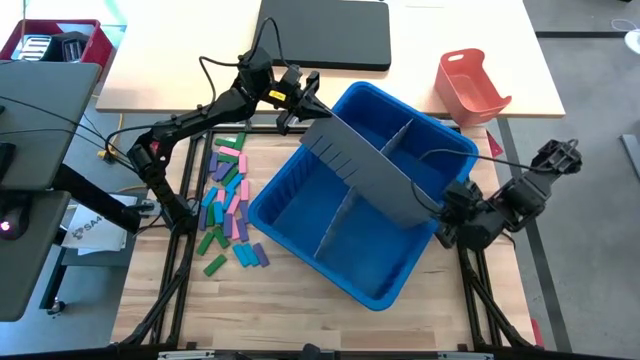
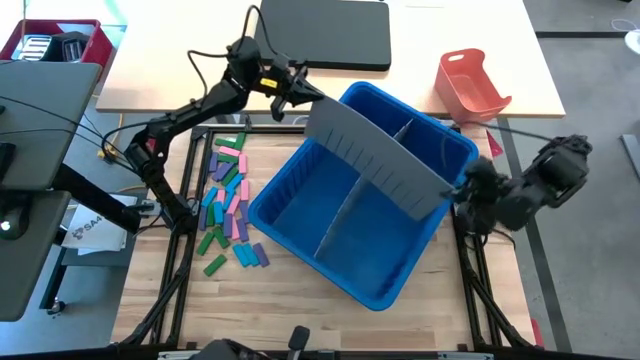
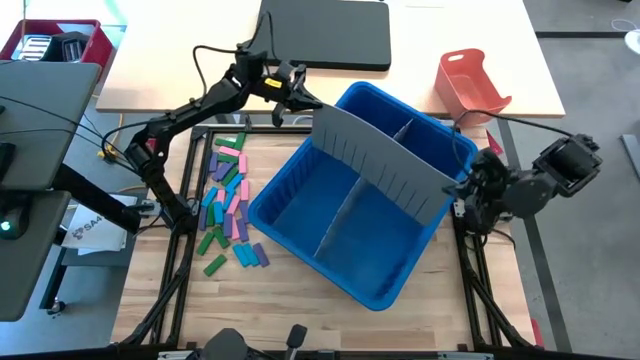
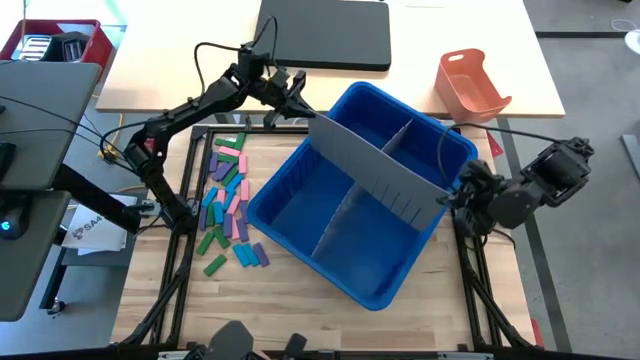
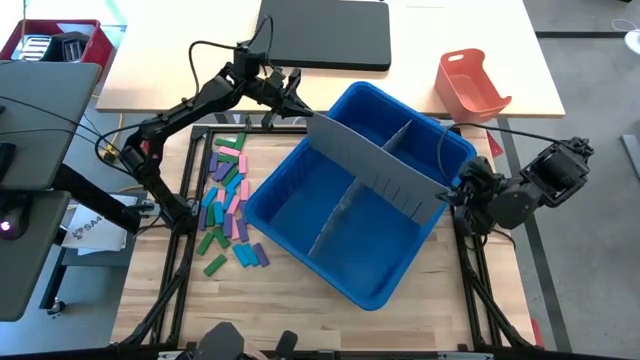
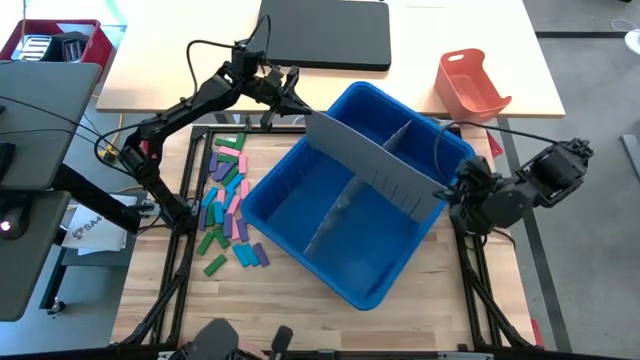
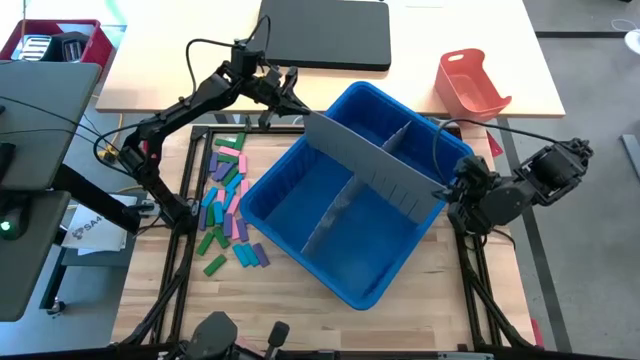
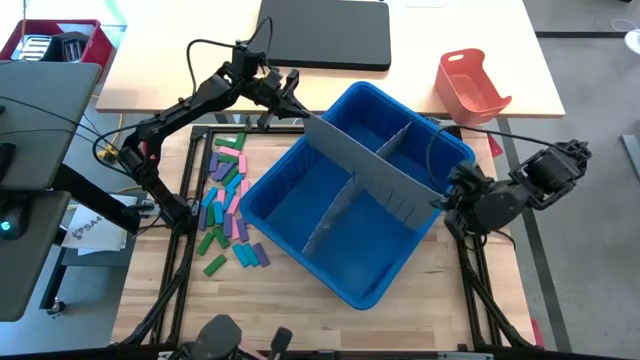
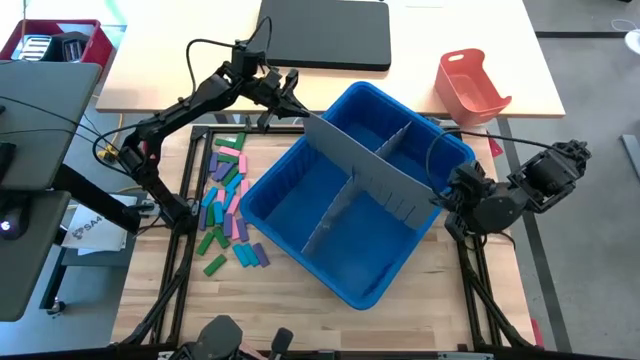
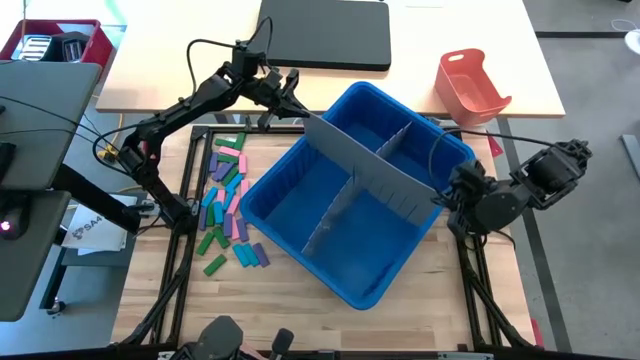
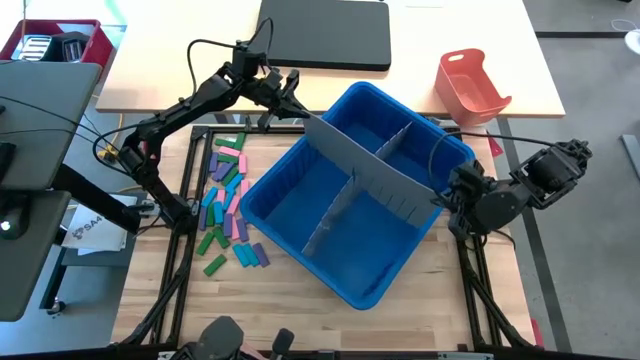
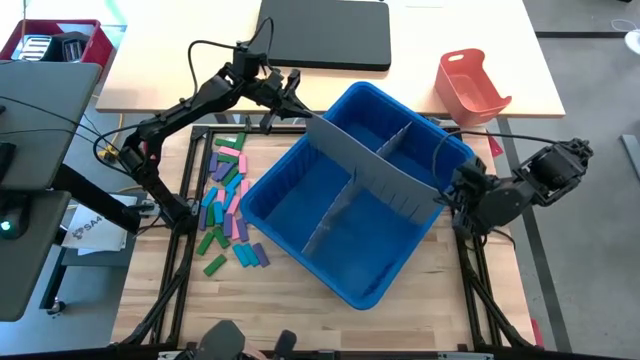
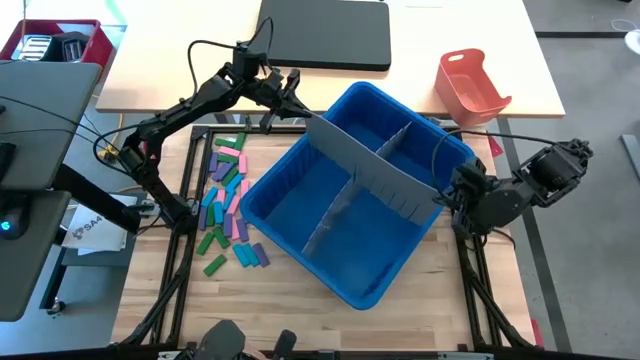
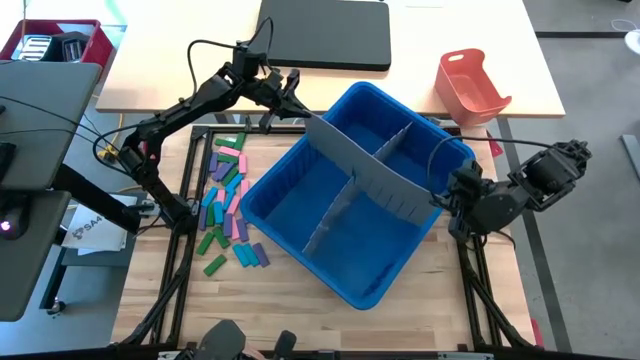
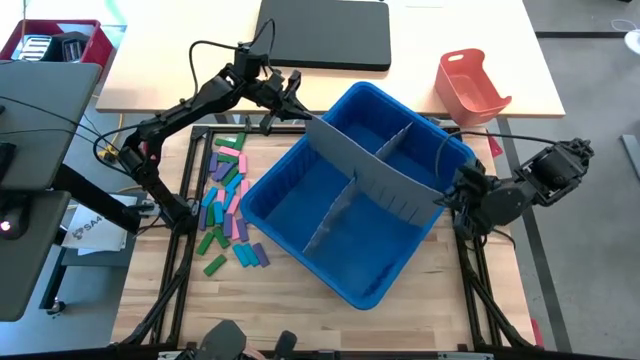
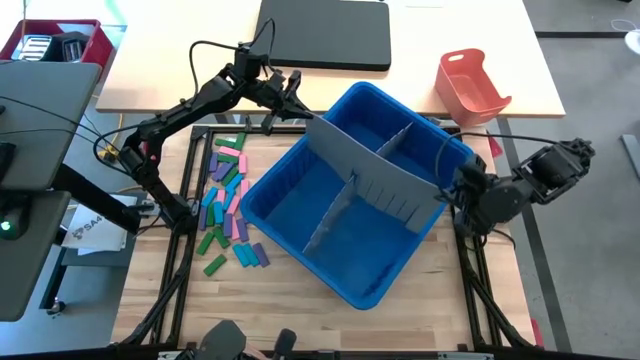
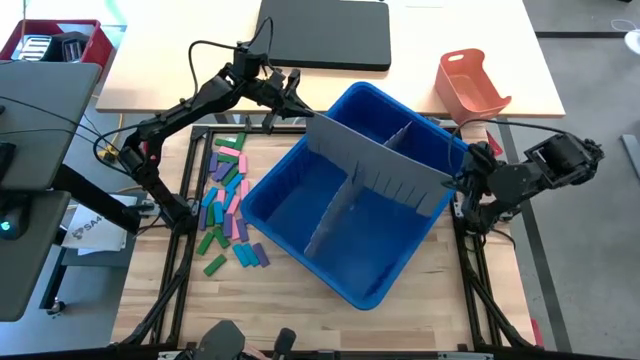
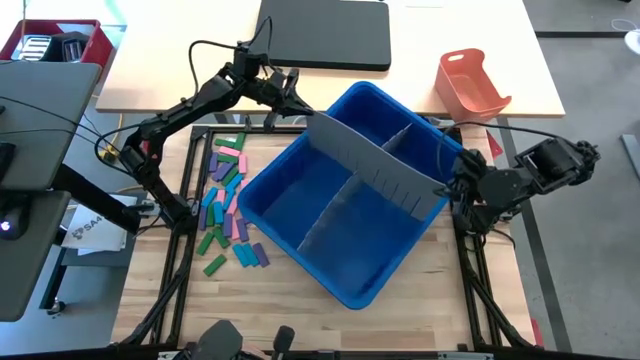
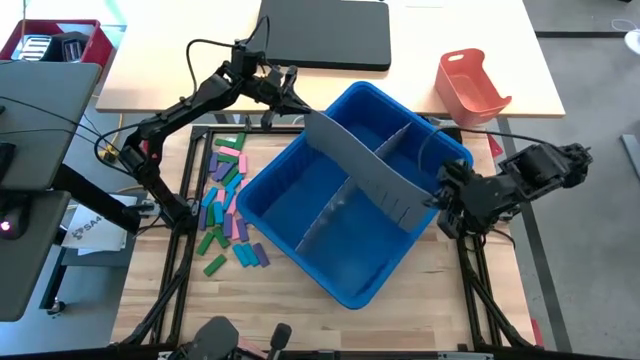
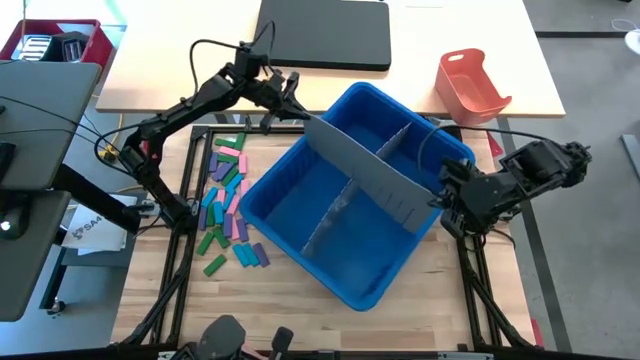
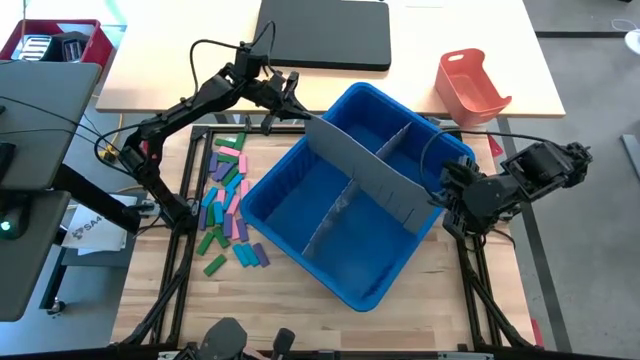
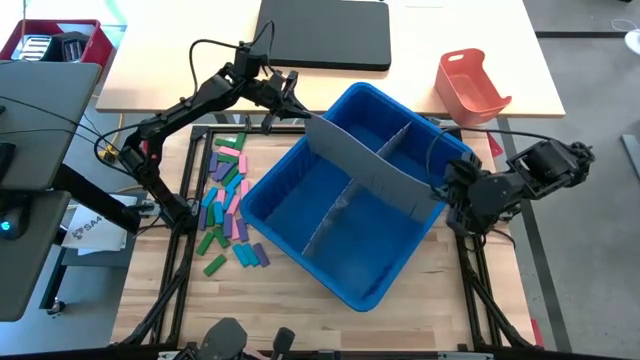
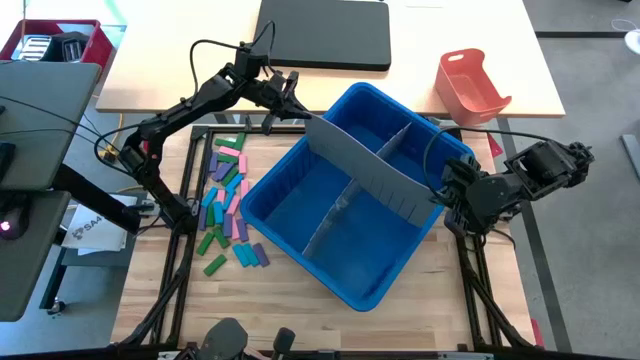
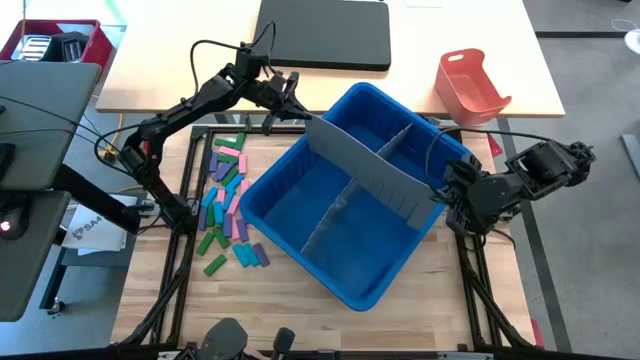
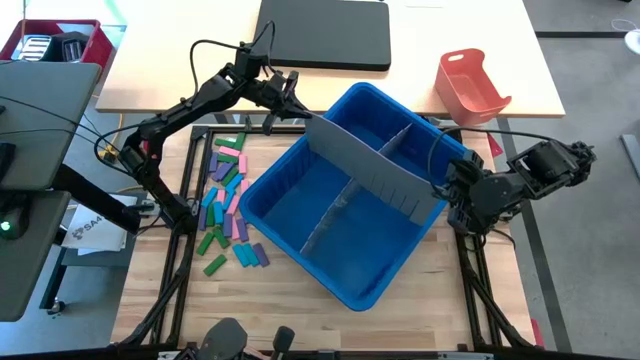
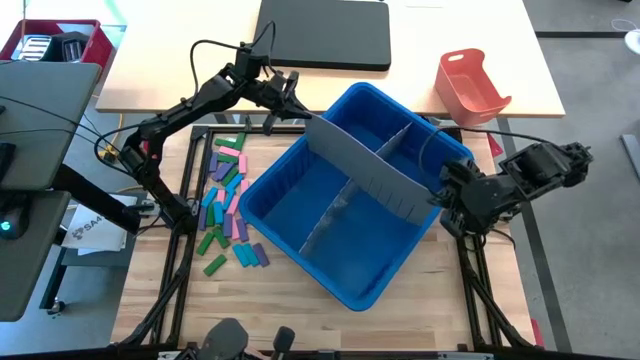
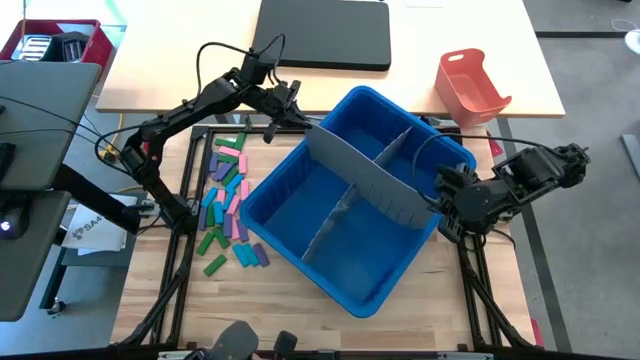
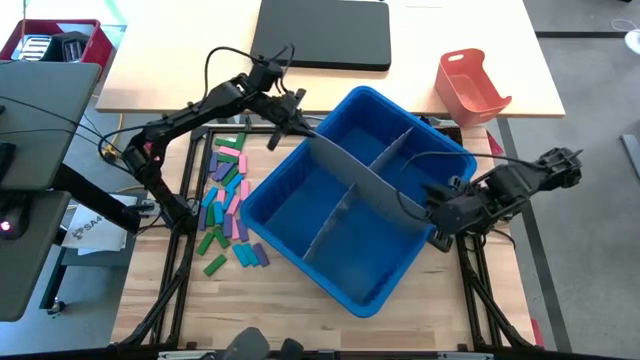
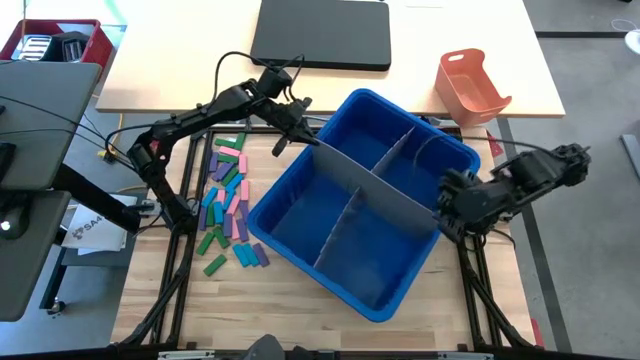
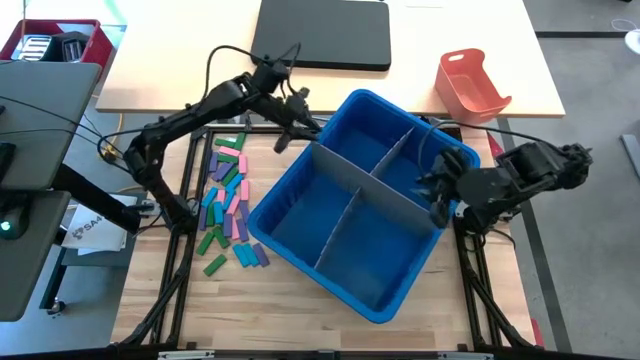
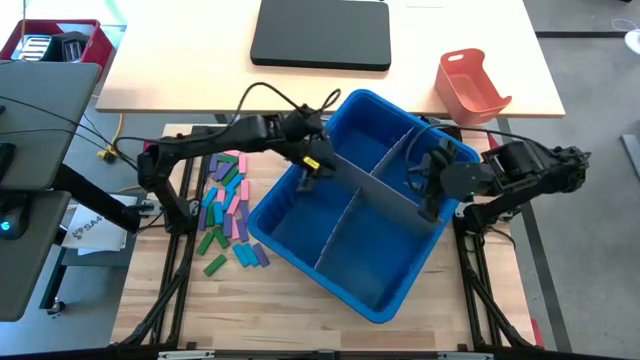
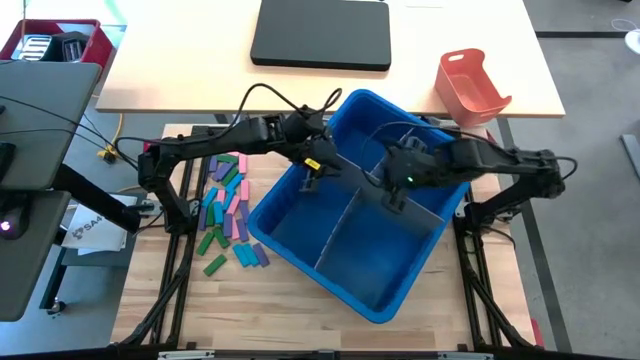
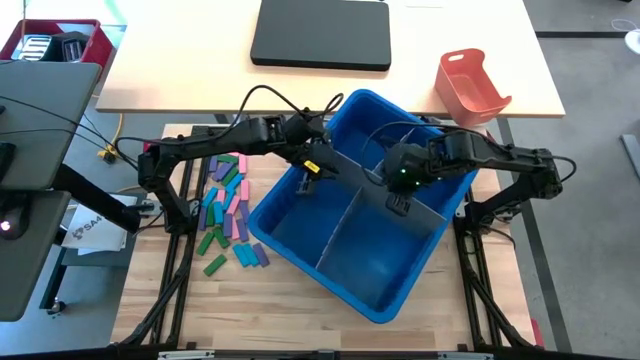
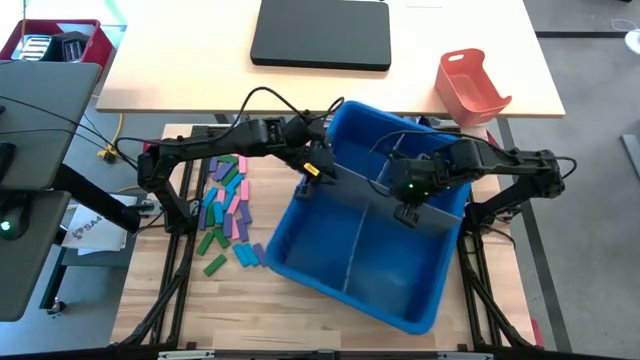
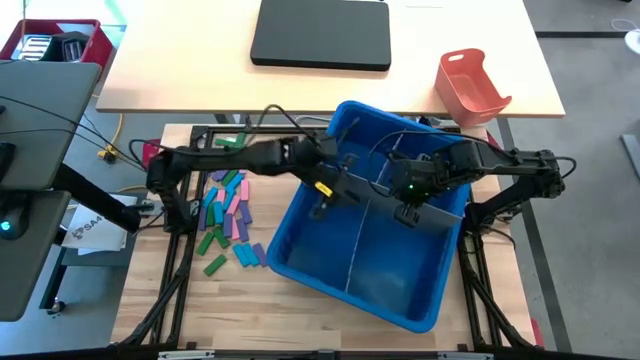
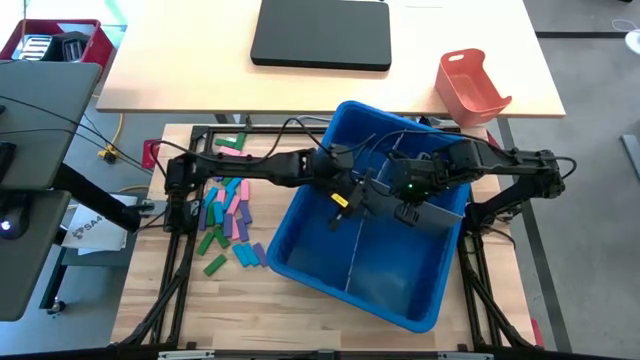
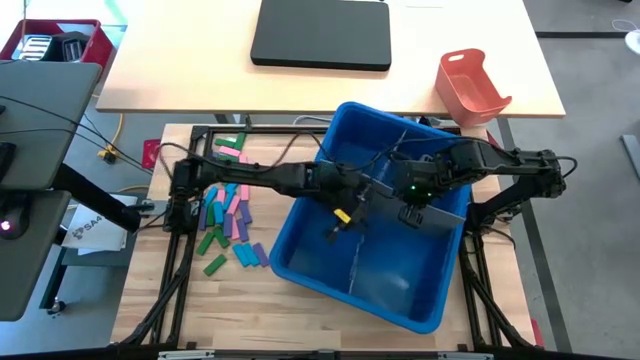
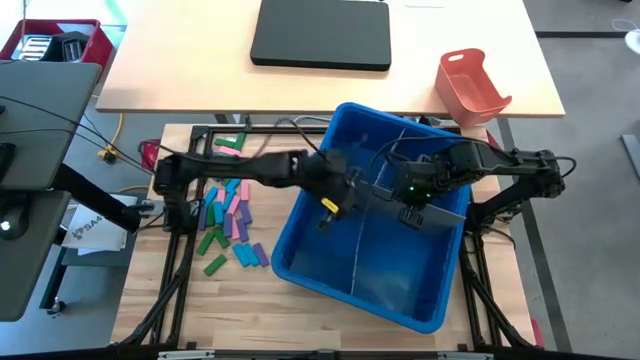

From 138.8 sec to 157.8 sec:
Task: Sort blocks
Insert the bin divider into the blue bin

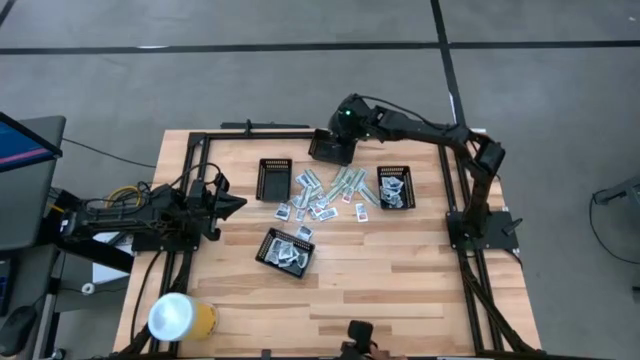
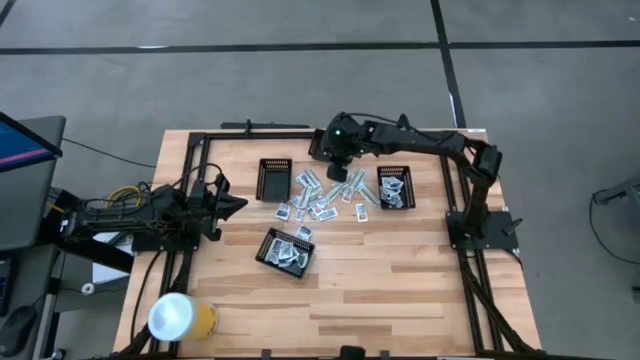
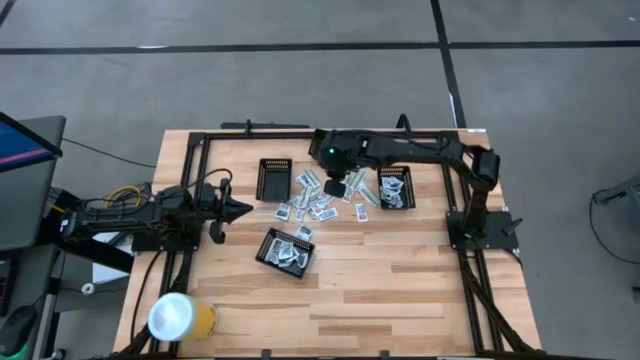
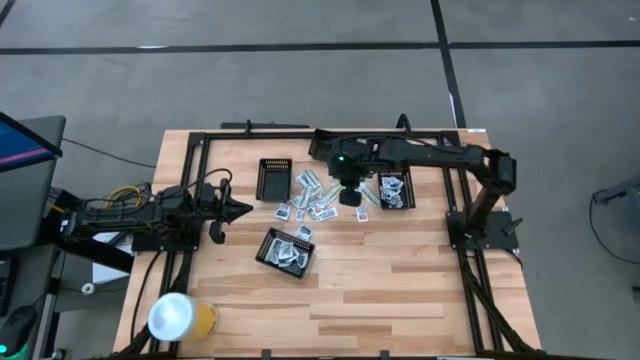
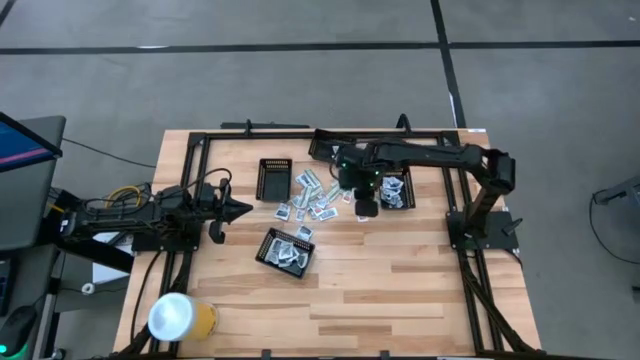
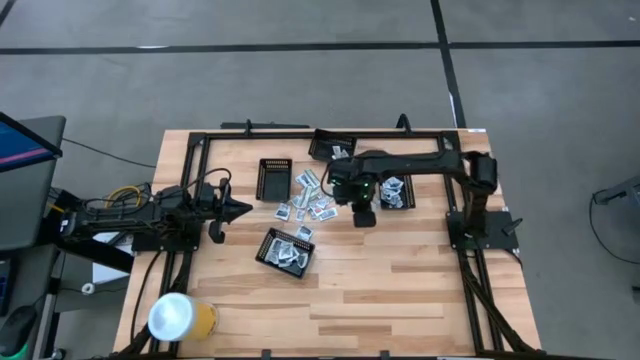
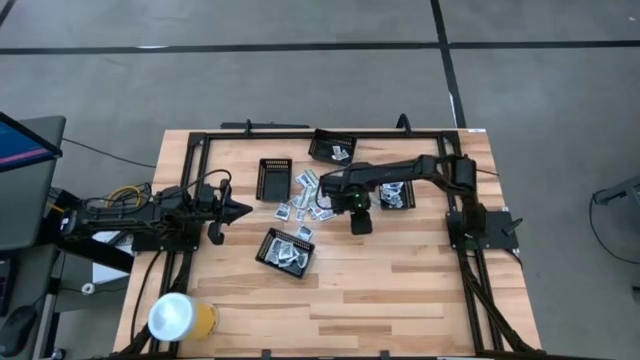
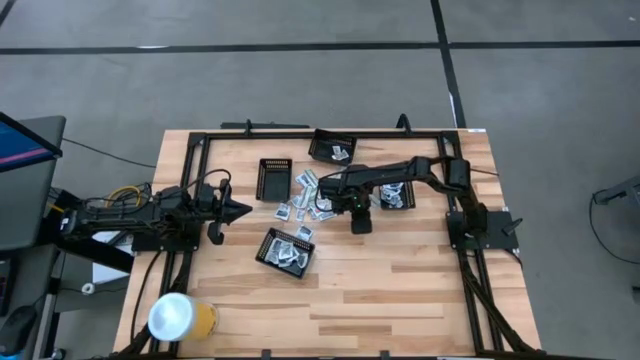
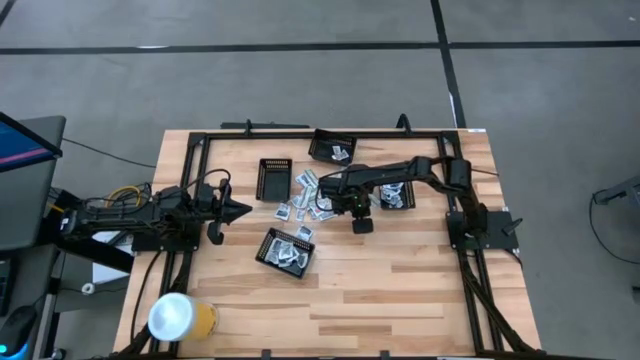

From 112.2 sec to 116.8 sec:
Task: Pick & Place First Aid Supplies
Put the orange ointment pack into the top black bin
